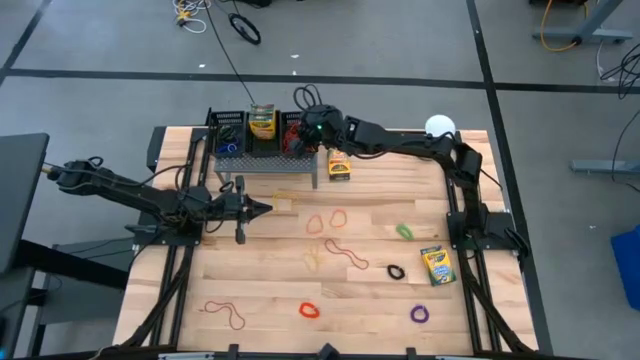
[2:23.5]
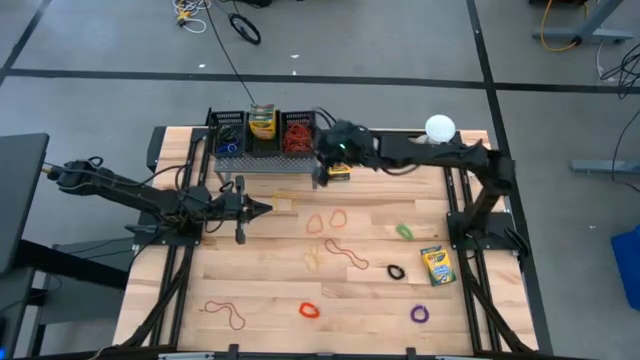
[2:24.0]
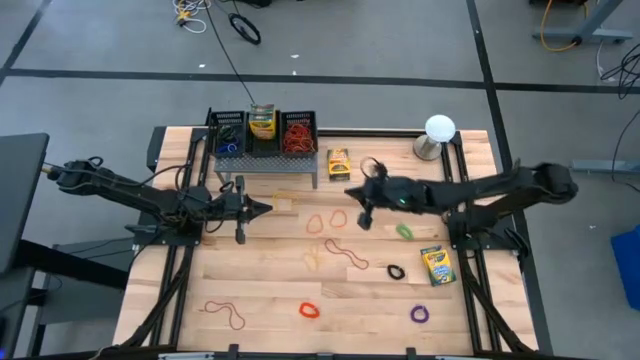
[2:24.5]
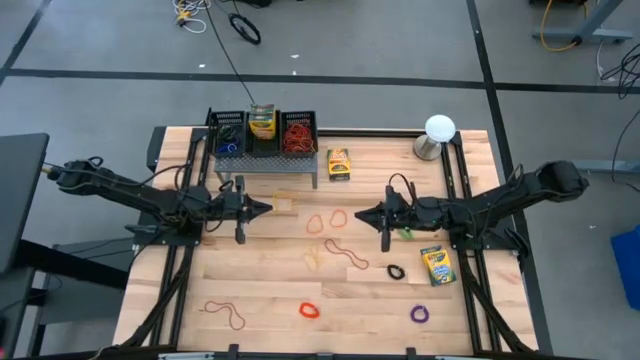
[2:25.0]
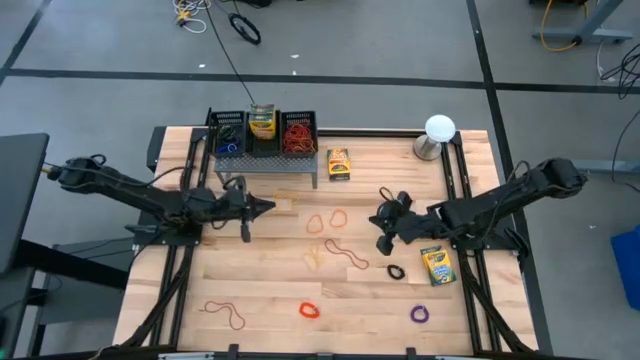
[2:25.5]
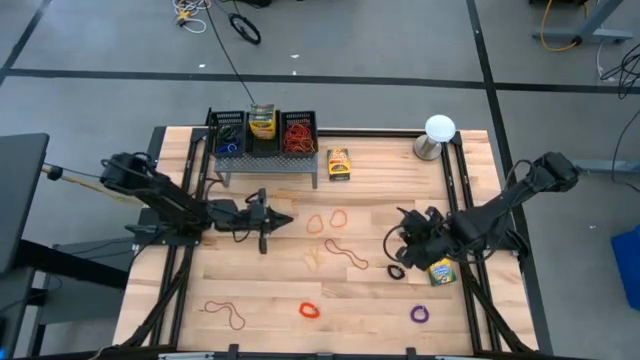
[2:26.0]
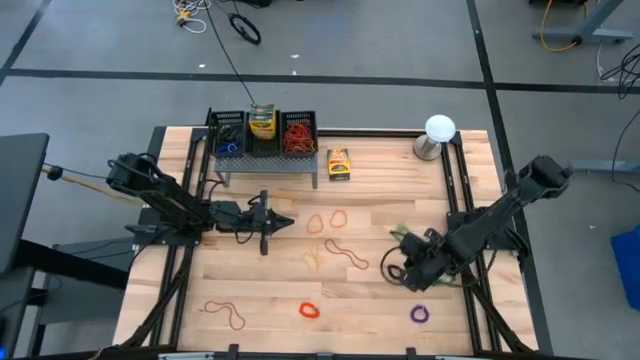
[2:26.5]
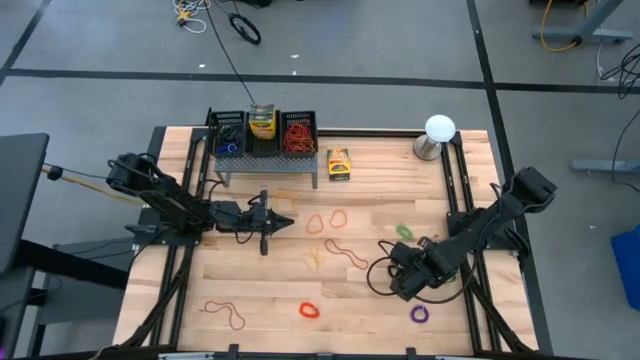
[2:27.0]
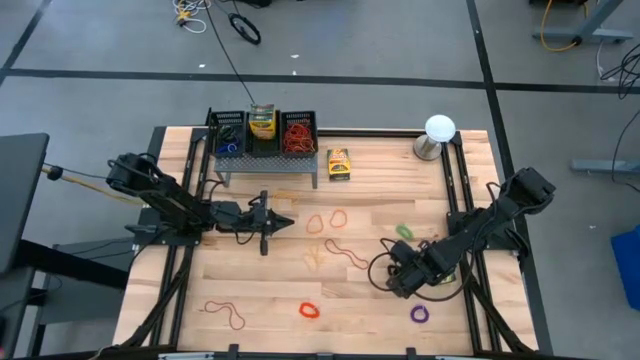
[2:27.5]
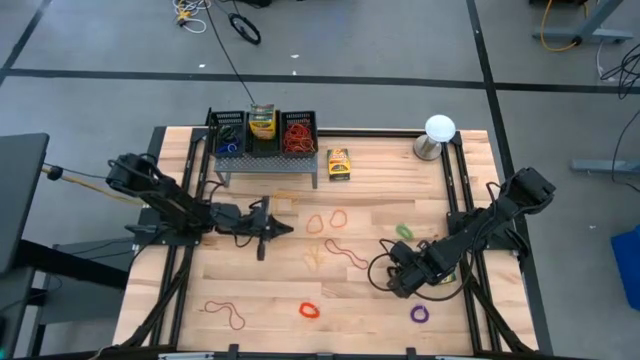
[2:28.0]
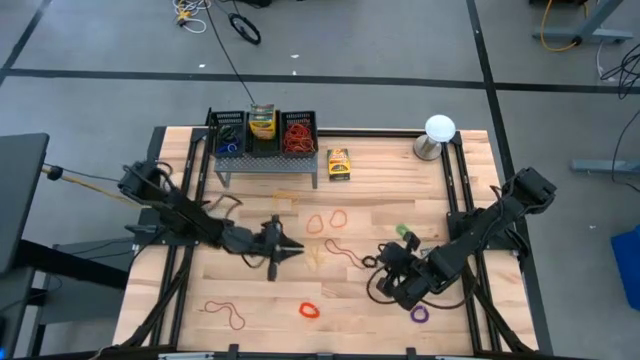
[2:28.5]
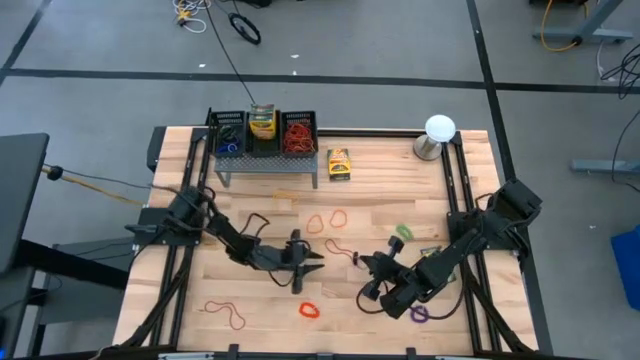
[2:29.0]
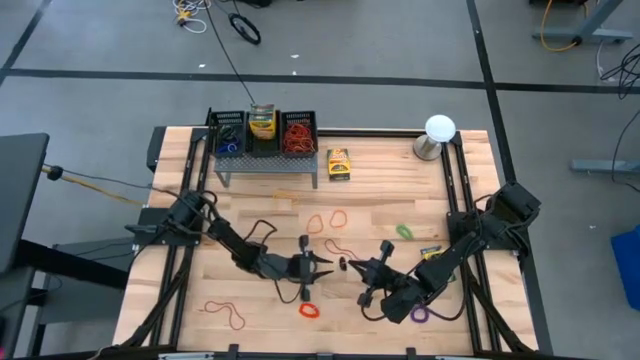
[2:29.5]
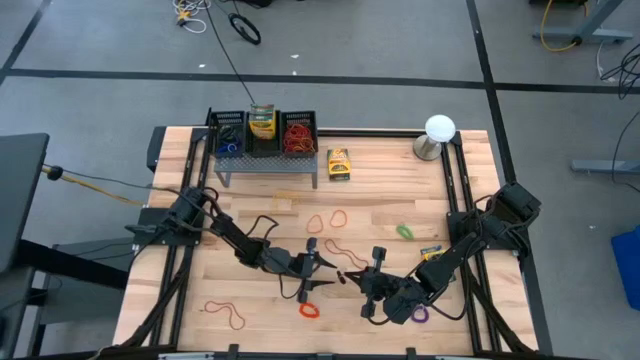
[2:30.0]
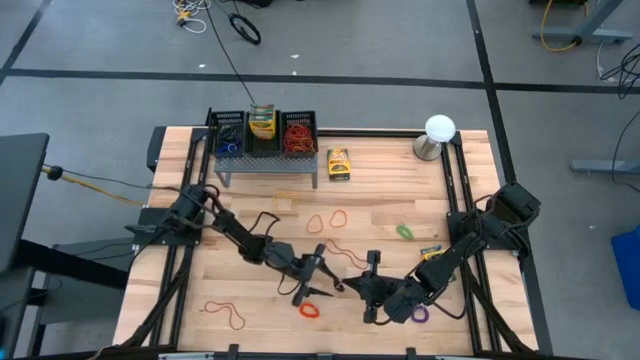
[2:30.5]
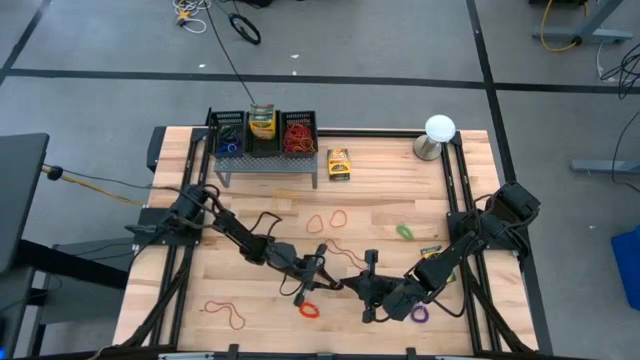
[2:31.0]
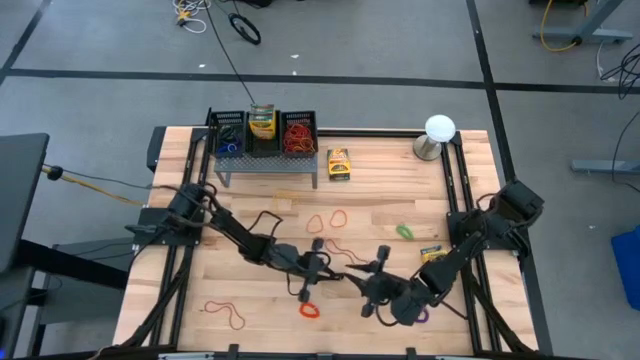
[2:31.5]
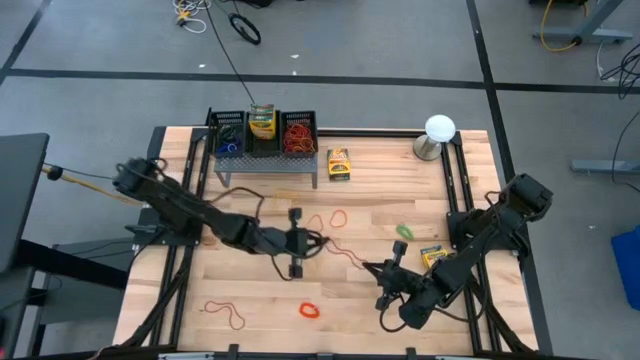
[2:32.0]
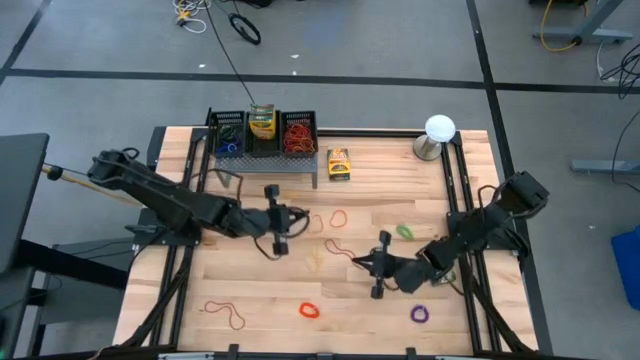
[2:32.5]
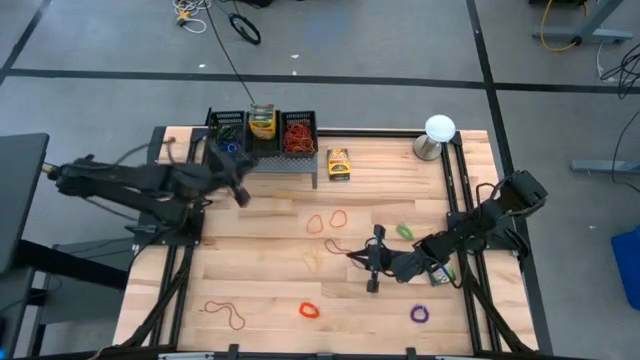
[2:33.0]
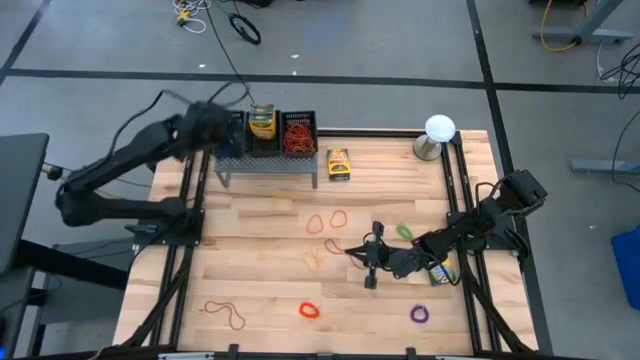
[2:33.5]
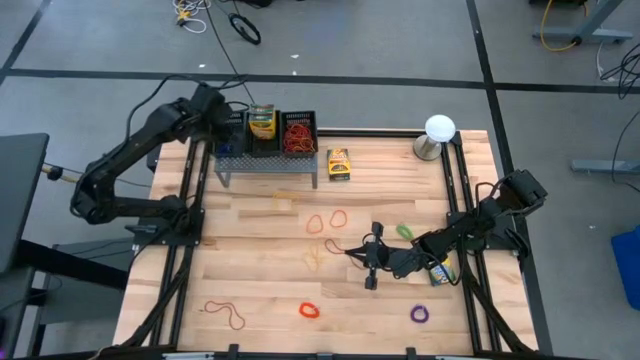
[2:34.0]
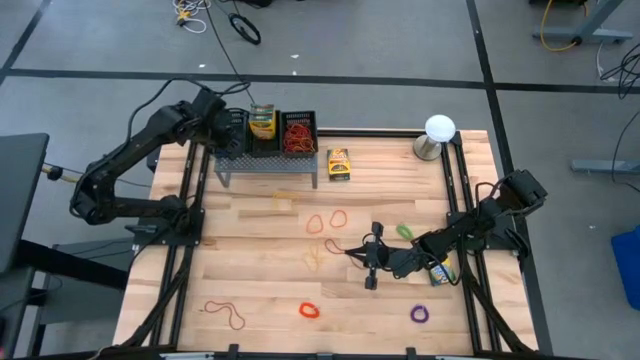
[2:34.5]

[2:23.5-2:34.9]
Task: Pick & Place Office Desk Supplies
Put the black spiral keychain into the left black bin

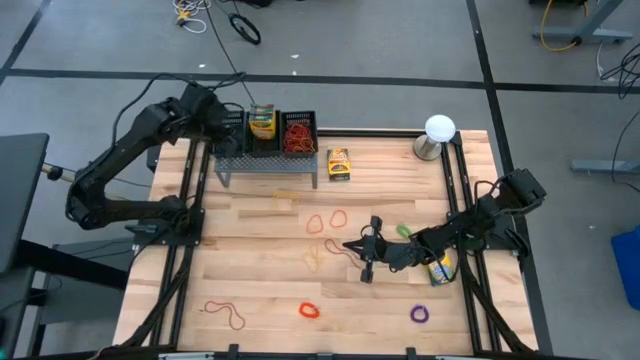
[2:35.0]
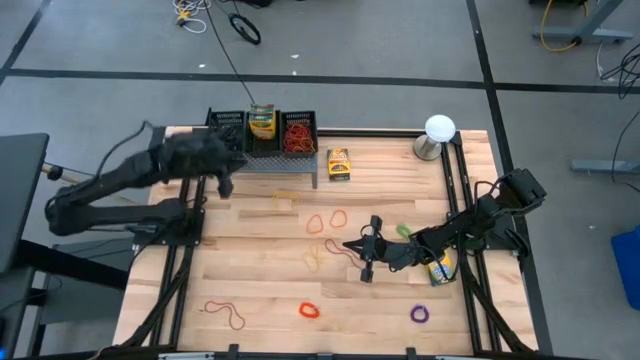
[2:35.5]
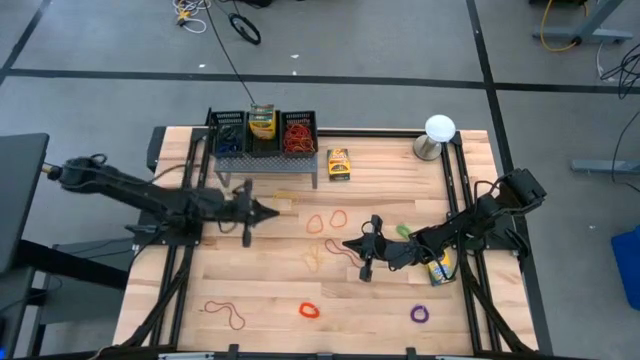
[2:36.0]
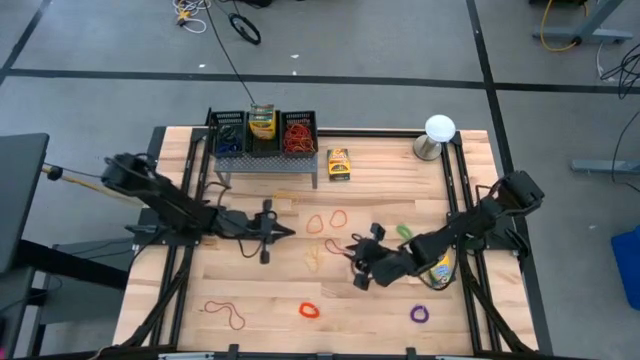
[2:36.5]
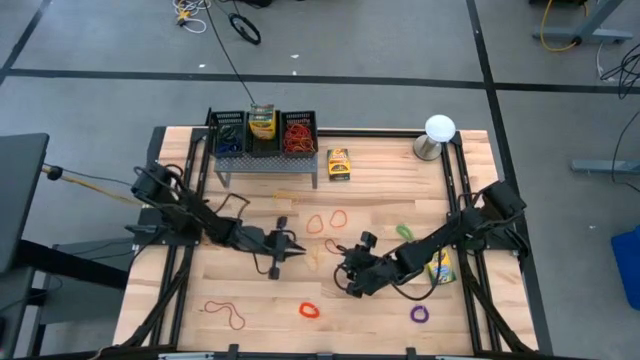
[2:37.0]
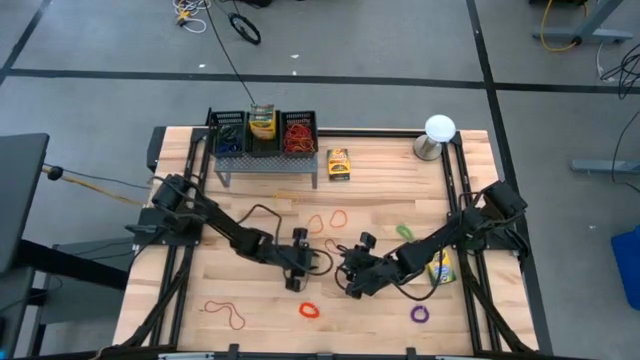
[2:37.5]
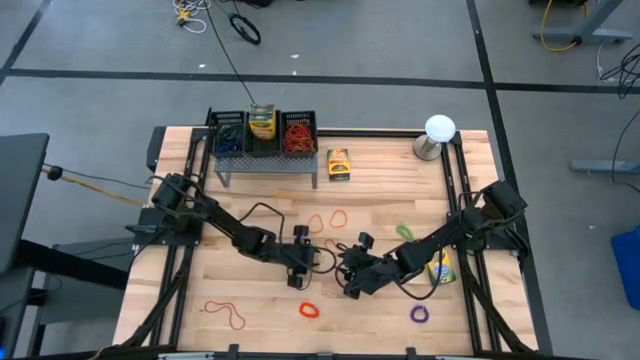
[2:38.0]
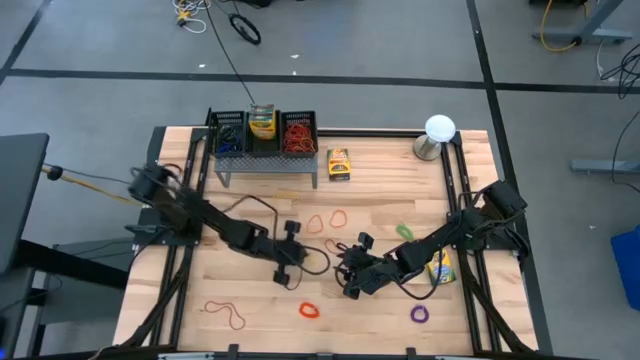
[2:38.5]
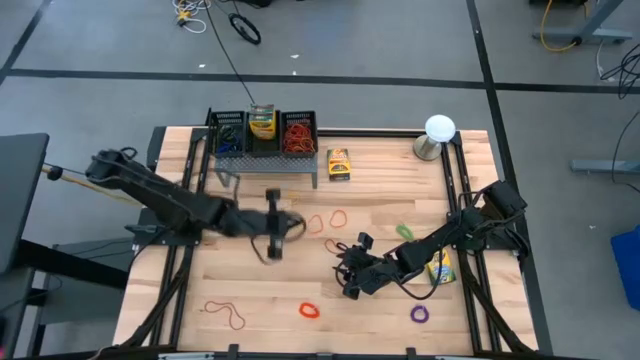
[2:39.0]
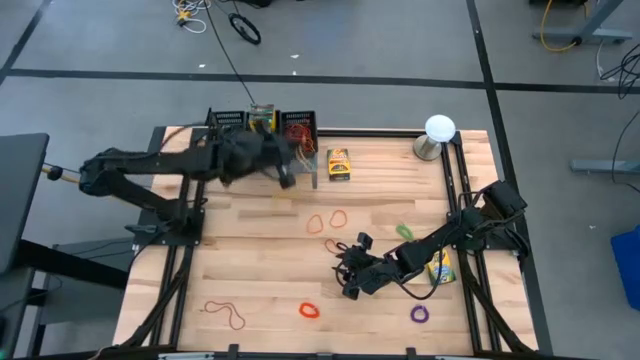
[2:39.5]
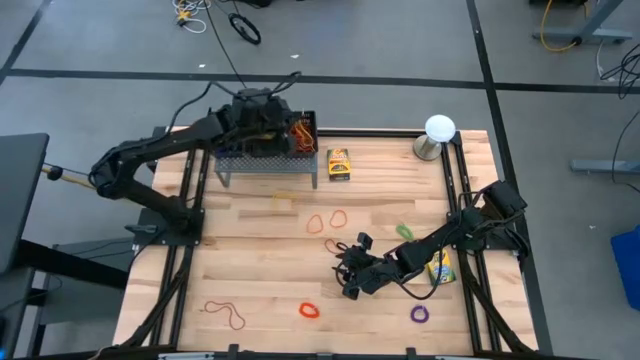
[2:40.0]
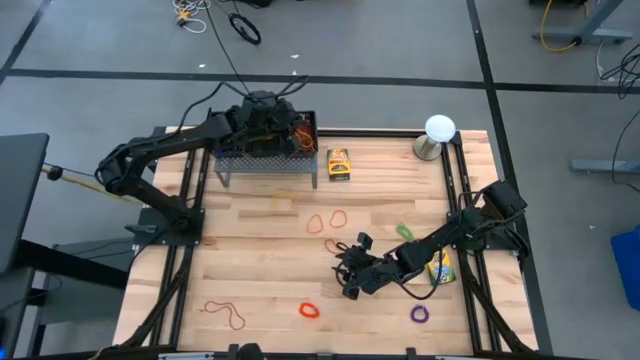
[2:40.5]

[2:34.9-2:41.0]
Put the bottom yellow rubber band into the right black bin

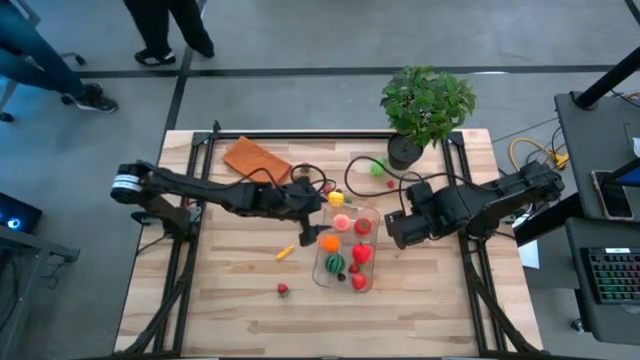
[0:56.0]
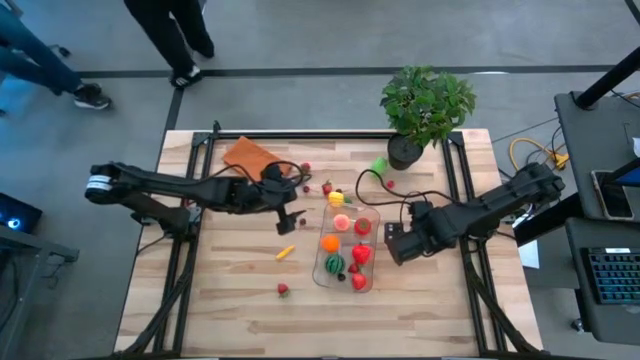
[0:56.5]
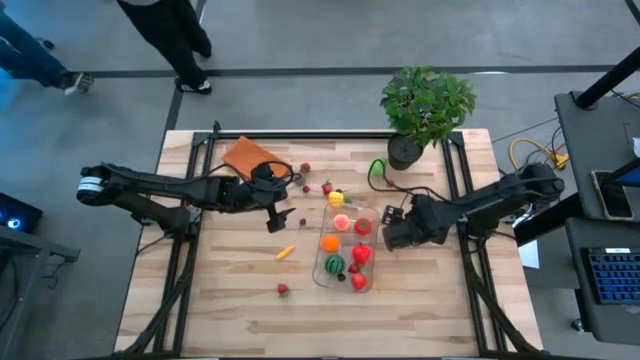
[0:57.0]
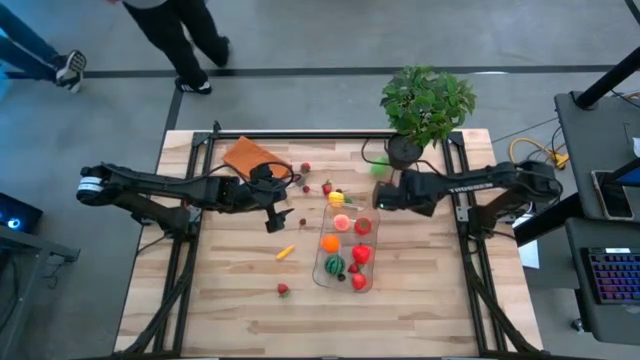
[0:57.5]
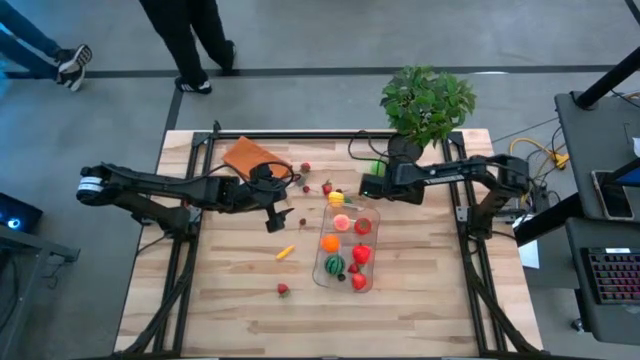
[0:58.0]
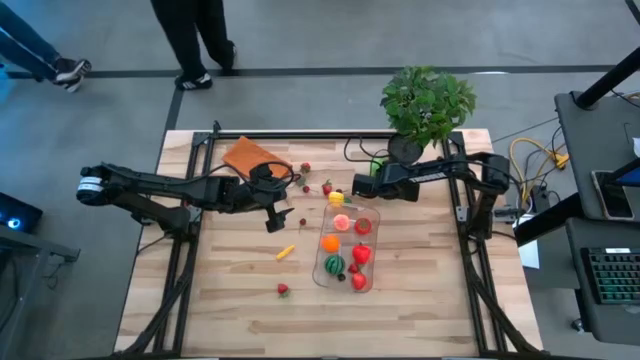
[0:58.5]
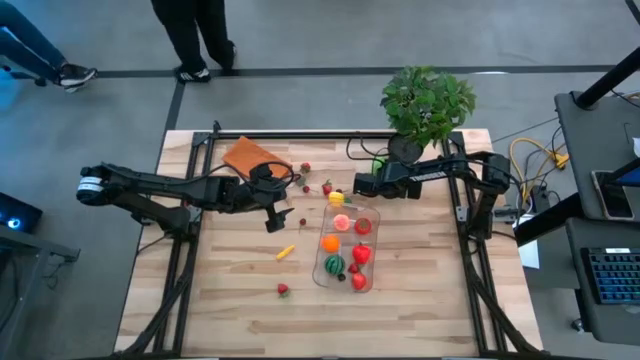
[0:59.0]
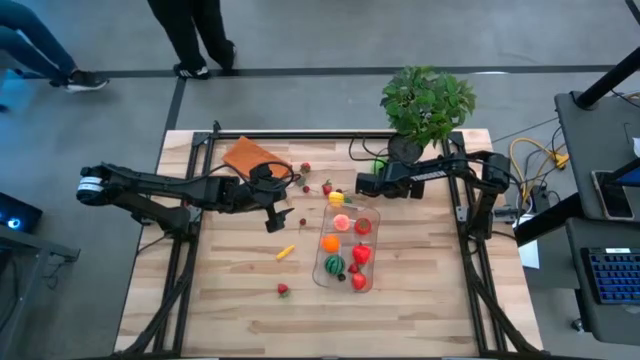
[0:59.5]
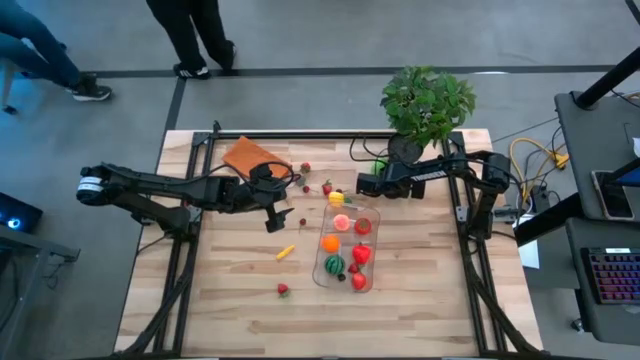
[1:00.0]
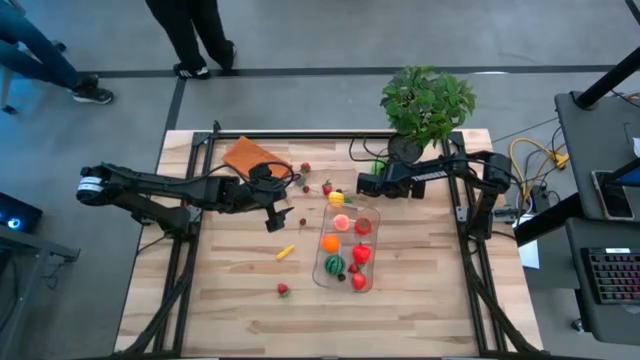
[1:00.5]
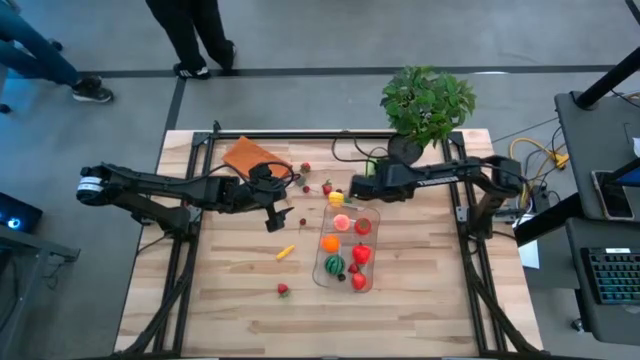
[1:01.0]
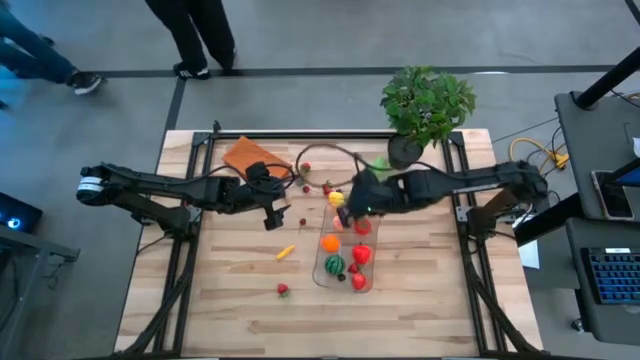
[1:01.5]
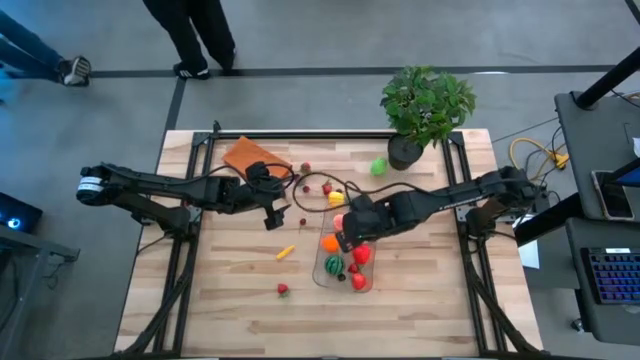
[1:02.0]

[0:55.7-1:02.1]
Task: Pick and placing Produce into tupperware
Put the cherry into the transparent bin
